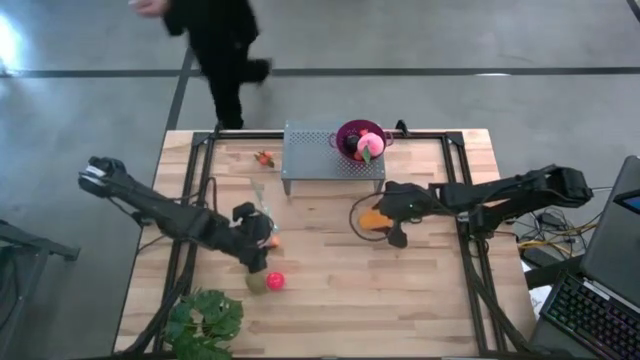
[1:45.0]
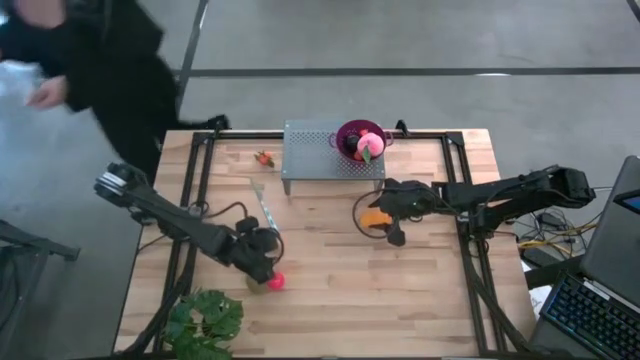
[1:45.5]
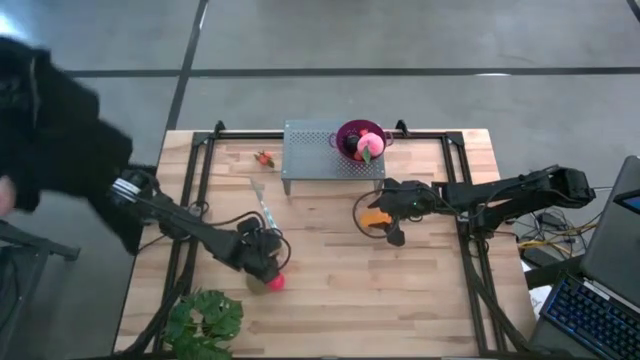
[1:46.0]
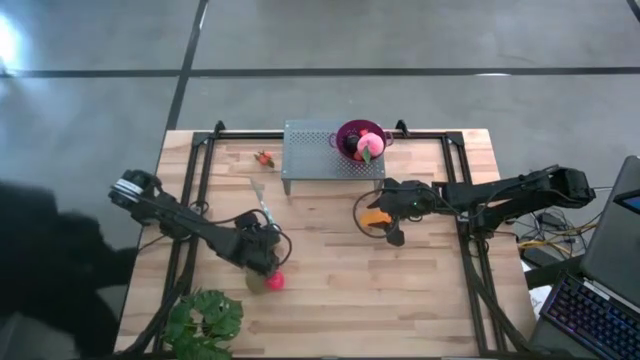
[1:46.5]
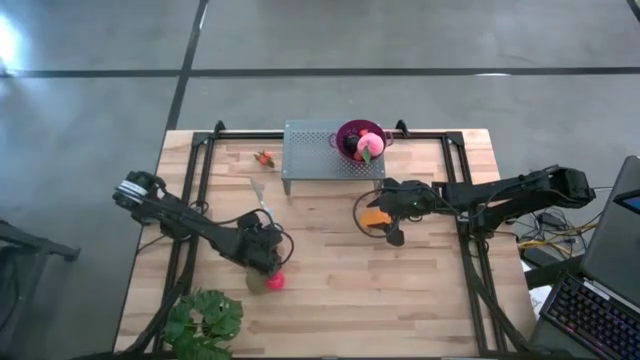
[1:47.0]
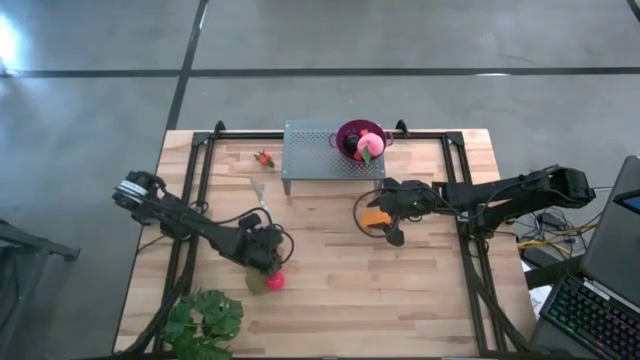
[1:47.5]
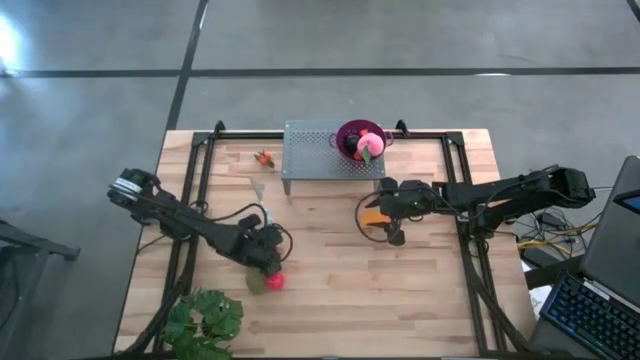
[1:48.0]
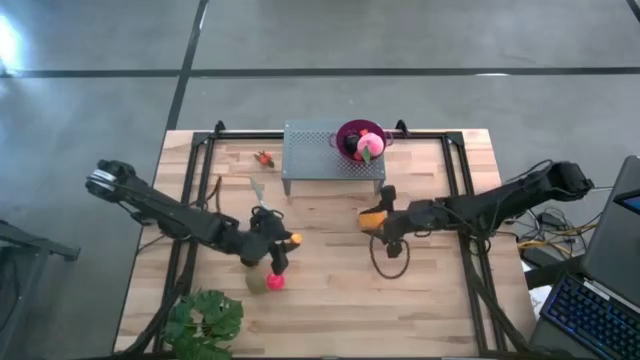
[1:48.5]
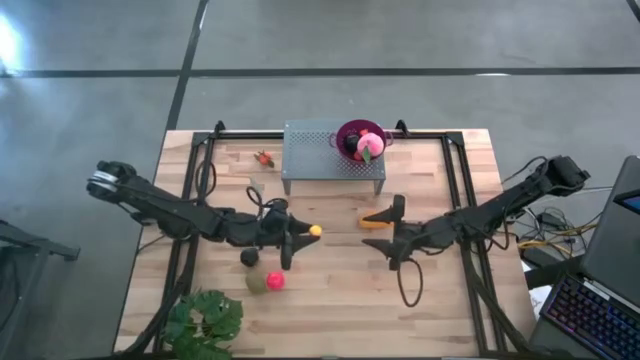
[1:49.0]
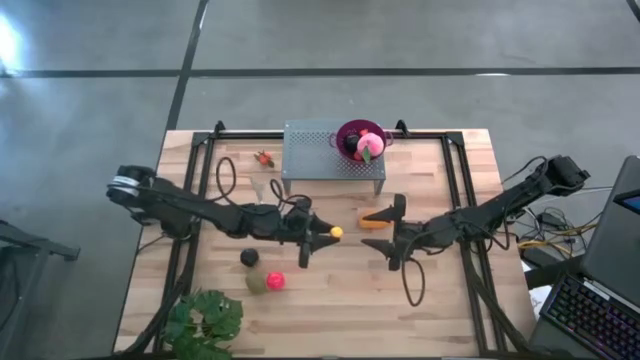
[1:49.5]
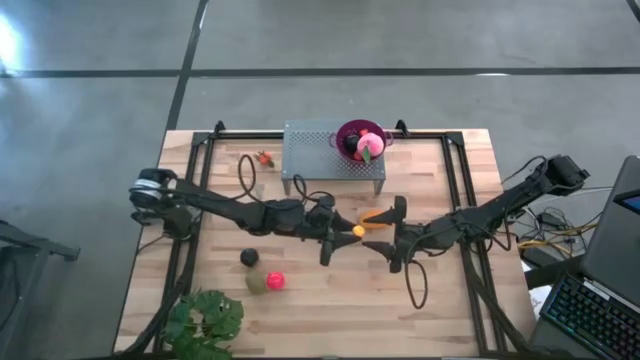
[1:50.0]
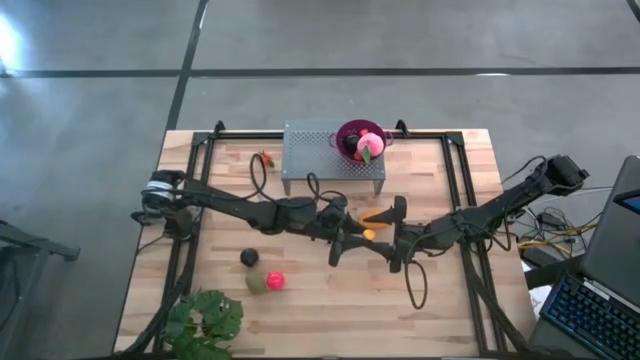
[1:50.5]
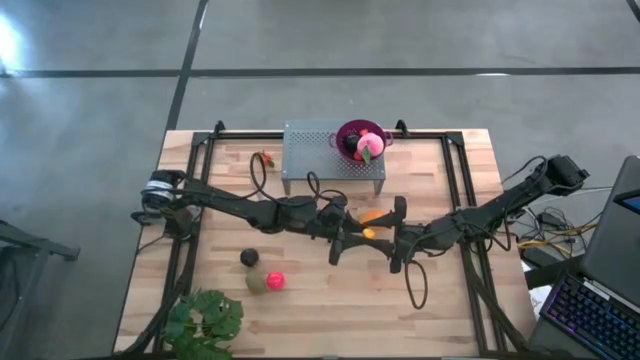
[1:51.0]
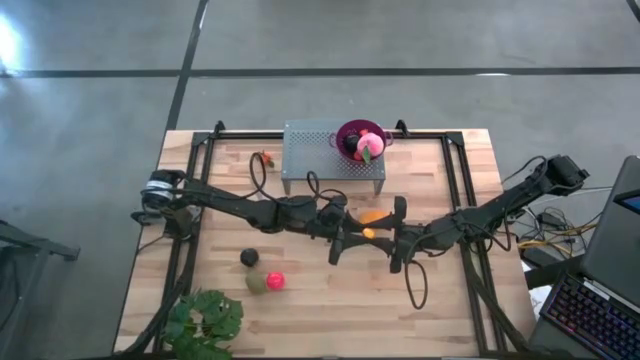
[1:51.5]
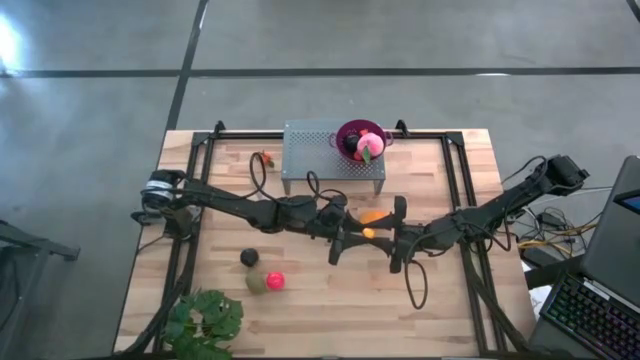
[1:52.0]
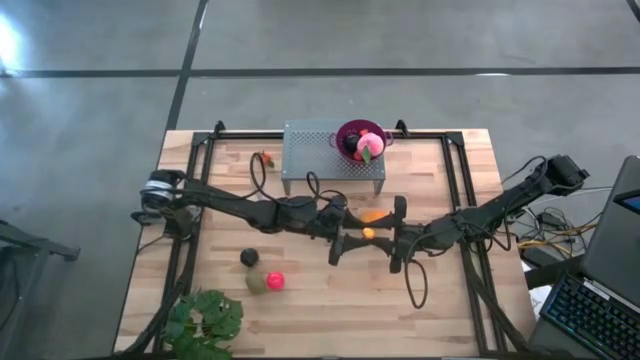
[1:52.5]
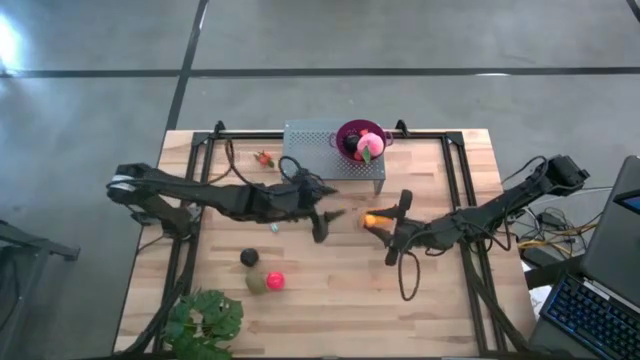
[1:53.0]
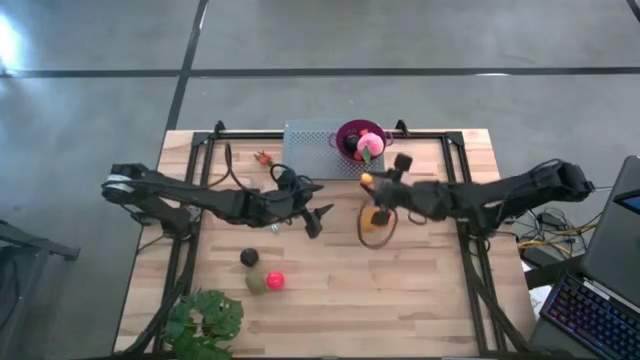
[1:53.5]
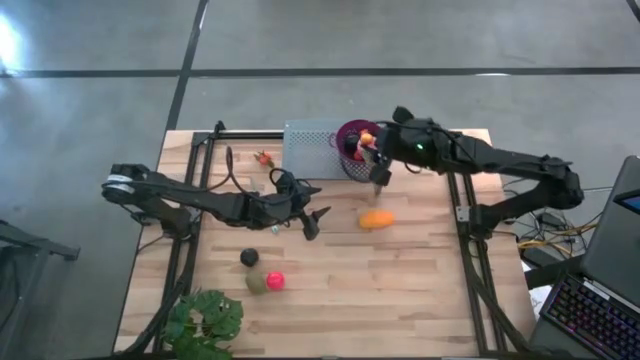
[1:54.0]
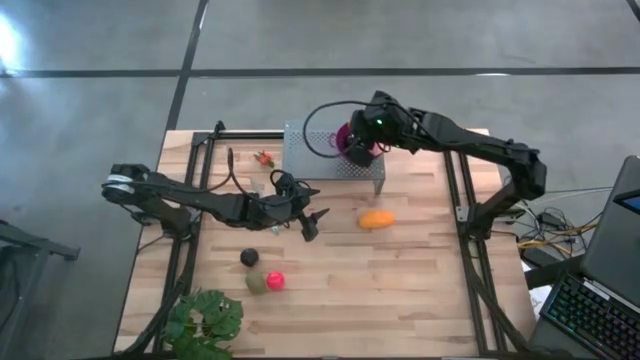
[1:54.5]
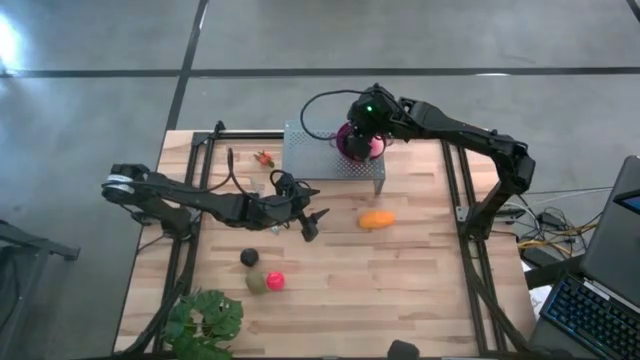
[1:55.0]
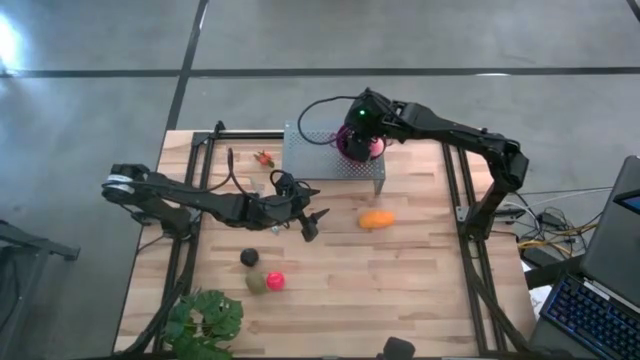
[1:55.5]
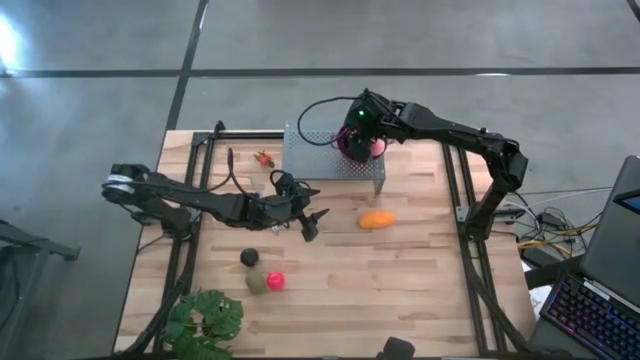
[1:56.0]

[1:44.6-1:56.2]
Task: Pick & Place Fruit
Put the pear into the purple bowl on the shelf

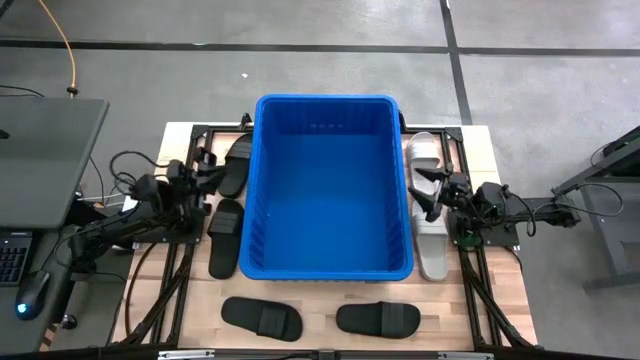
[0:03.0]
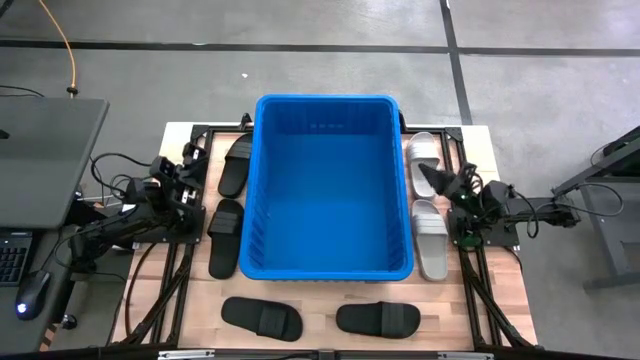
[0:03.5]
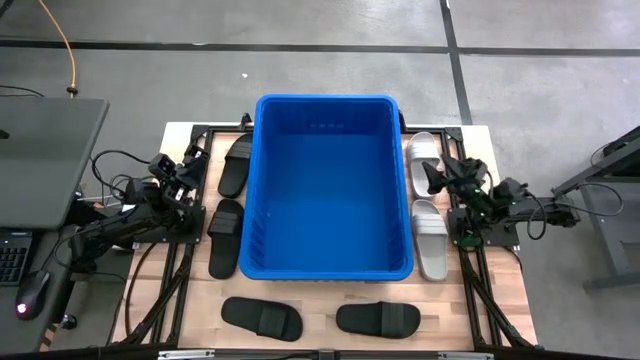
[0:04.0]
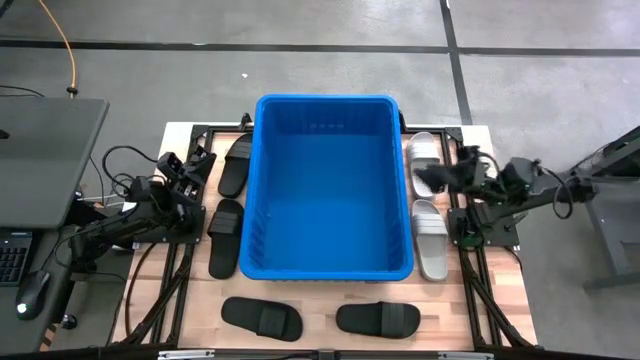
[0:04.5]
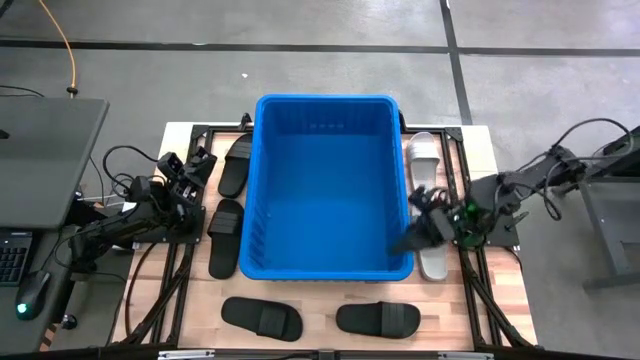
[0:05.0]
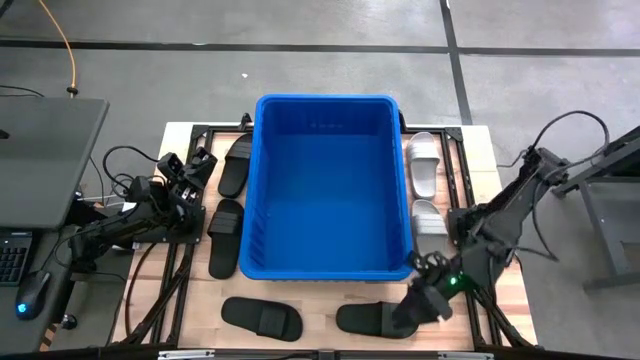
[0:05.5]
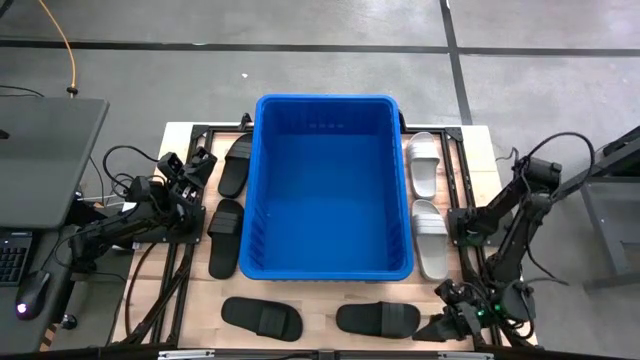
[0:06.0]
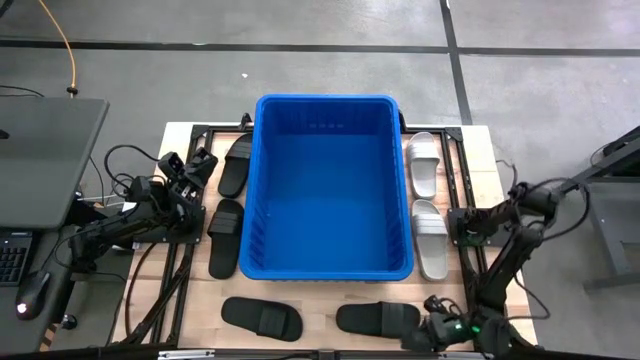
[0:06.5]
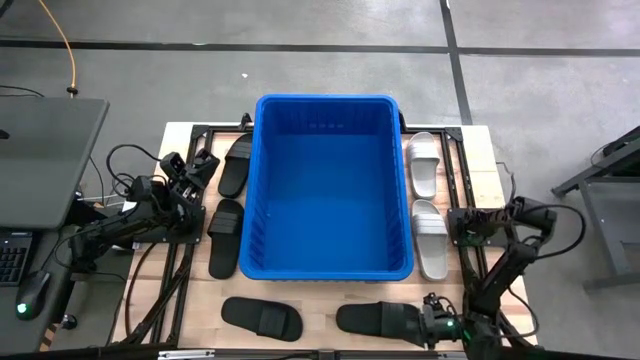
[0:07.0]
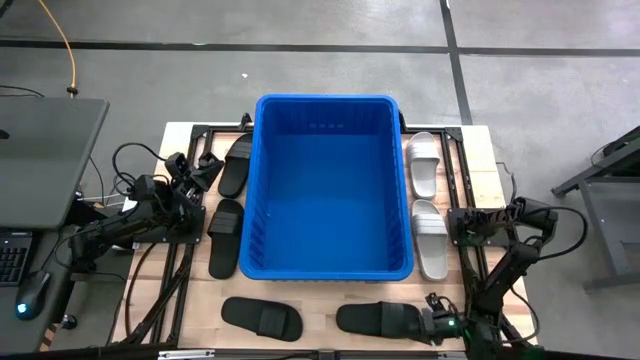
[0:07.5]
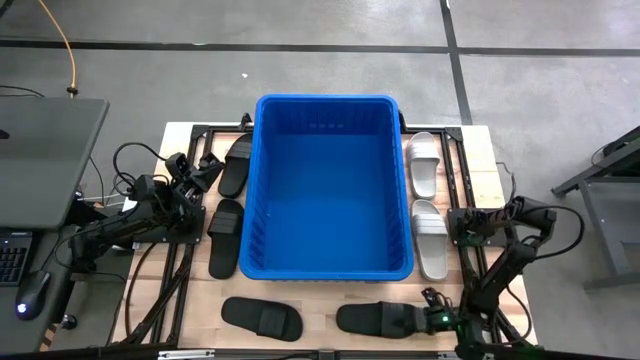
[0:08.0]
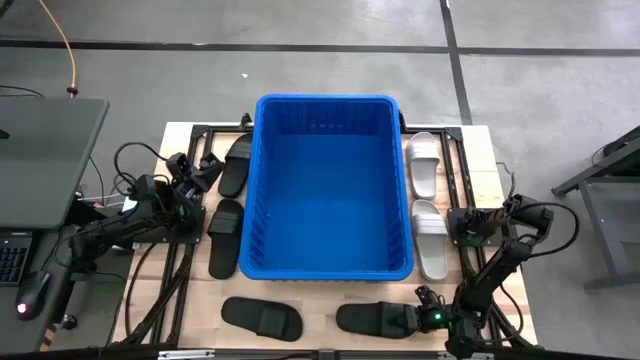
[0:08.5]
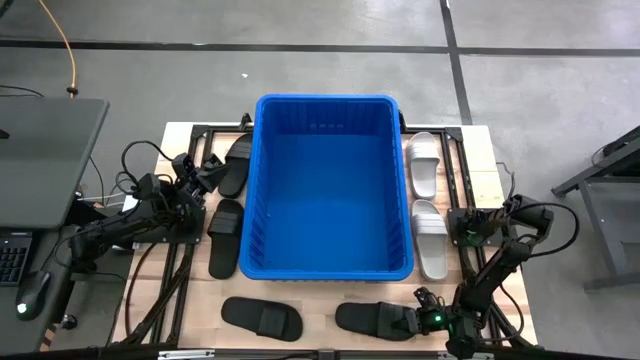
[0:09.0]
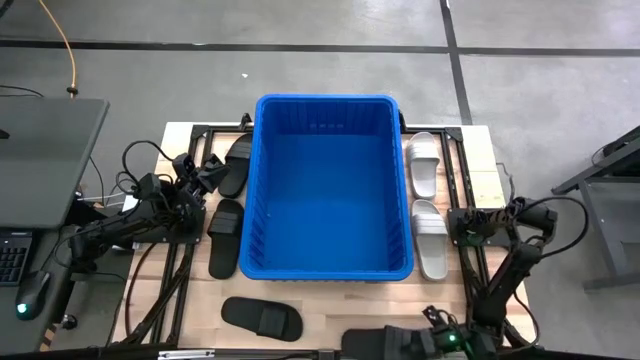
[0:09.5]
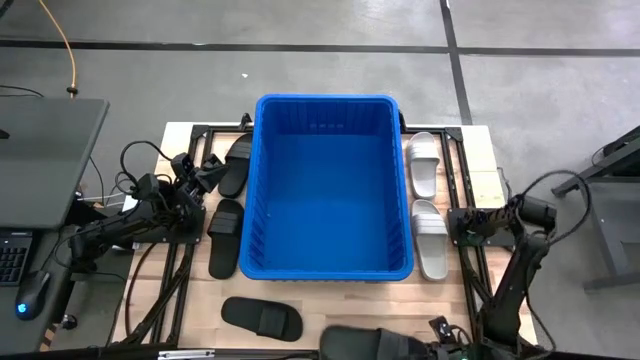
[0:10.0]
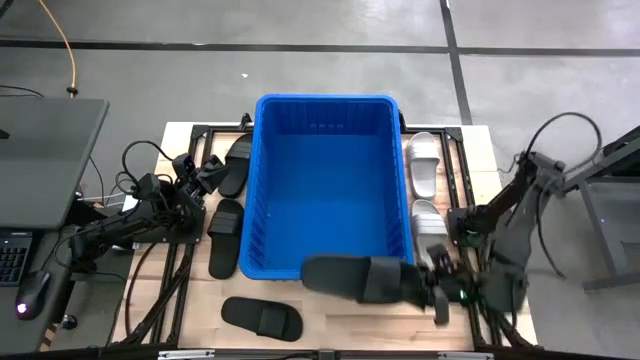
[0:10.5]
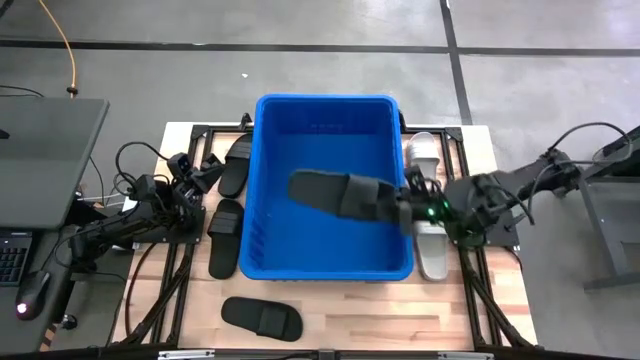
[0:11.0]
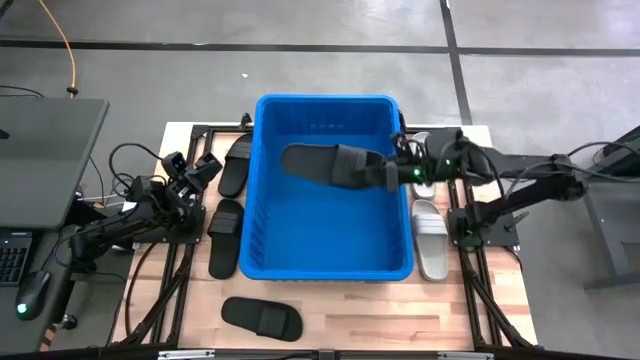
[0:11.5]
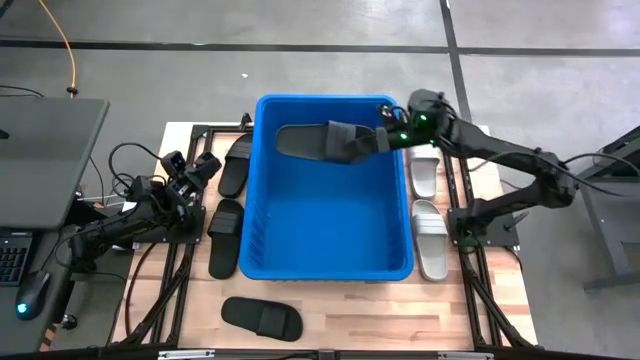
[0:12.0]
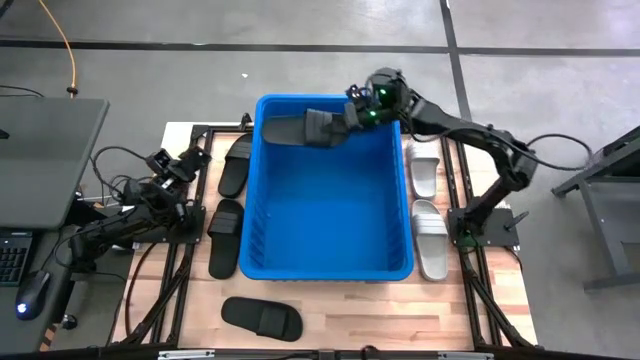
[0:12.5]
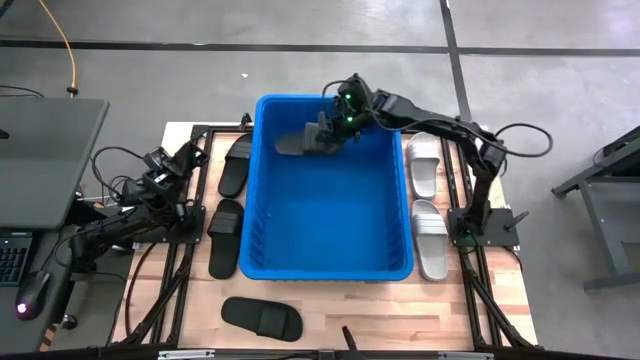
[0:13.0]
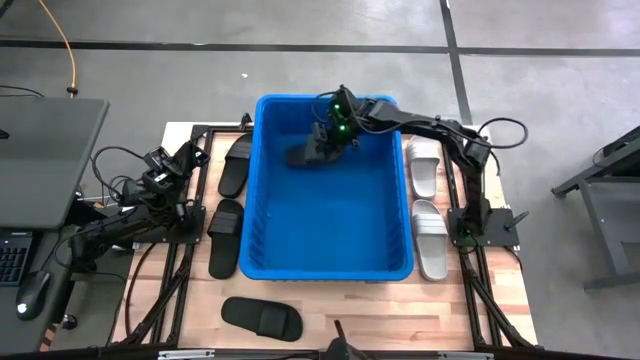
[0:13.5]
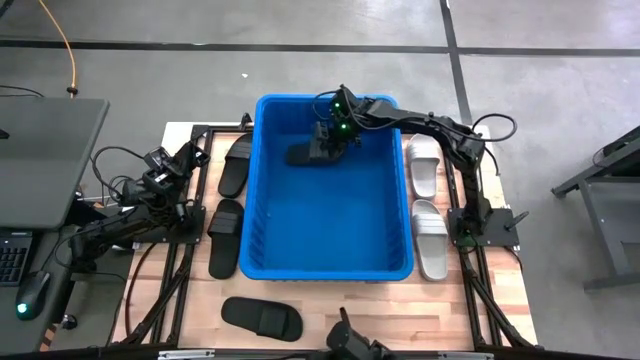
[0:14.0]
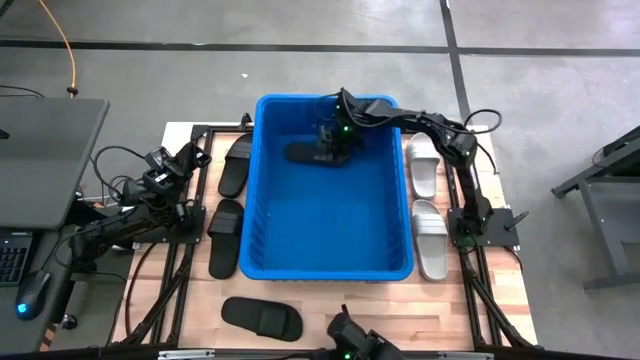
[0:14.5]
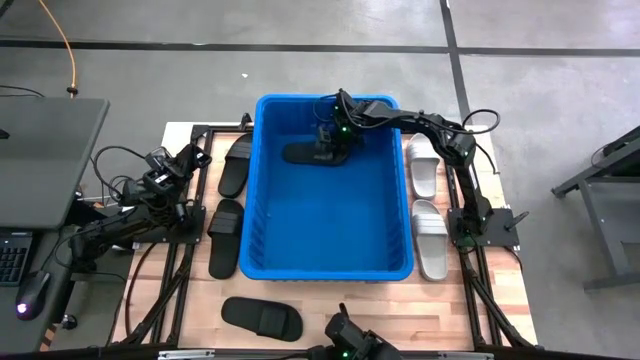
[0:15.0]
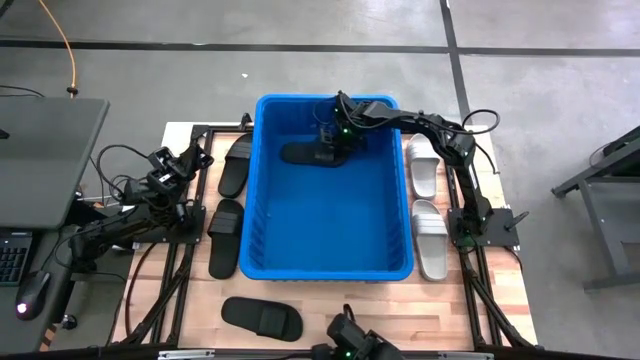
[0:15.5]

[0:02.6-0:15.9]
Task: Pick and place slides into bin
Put the black slide into the blue container
